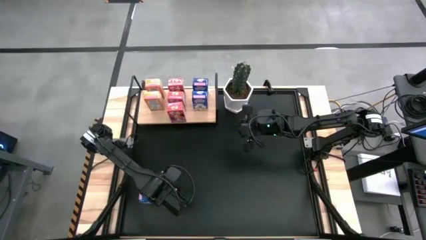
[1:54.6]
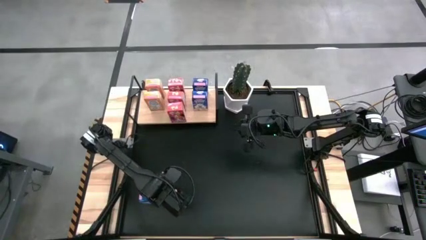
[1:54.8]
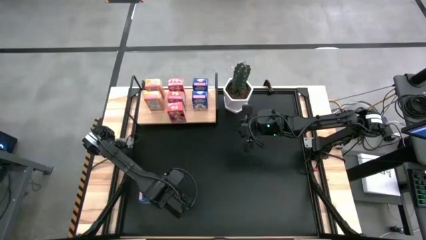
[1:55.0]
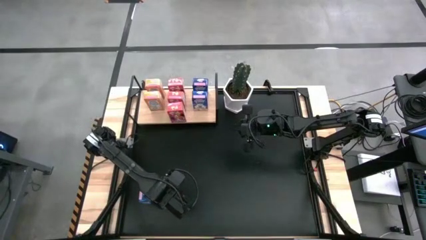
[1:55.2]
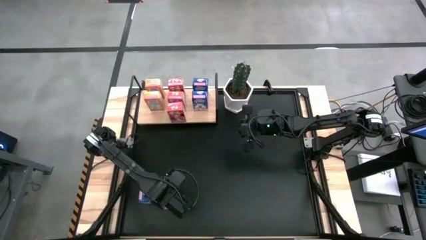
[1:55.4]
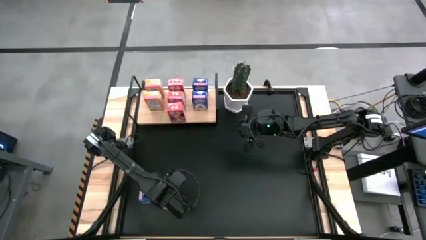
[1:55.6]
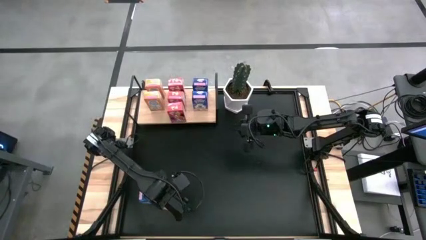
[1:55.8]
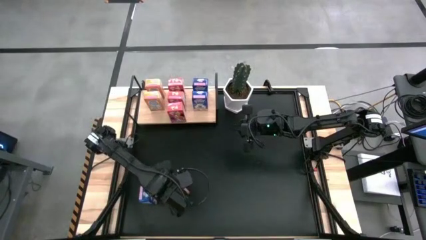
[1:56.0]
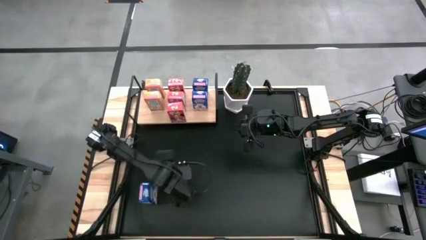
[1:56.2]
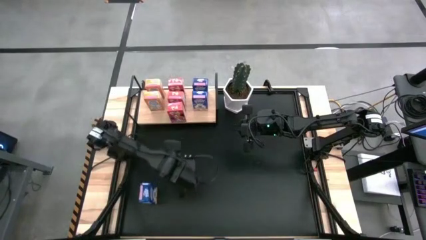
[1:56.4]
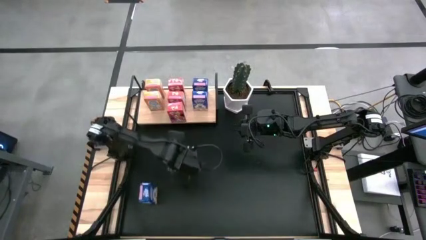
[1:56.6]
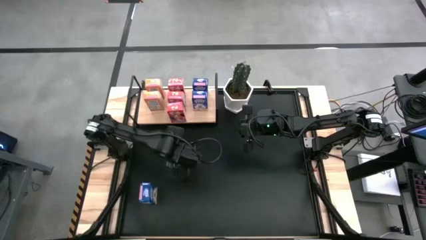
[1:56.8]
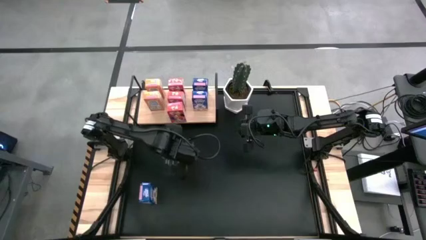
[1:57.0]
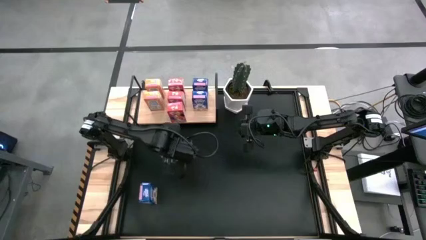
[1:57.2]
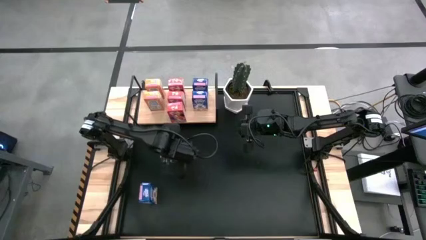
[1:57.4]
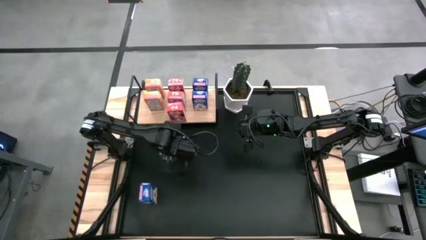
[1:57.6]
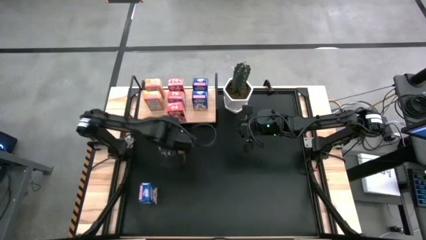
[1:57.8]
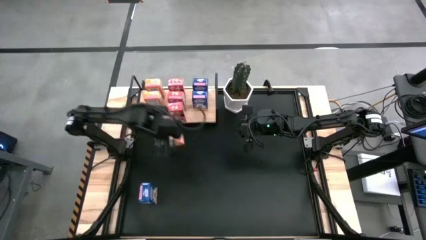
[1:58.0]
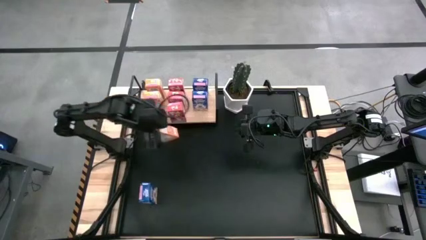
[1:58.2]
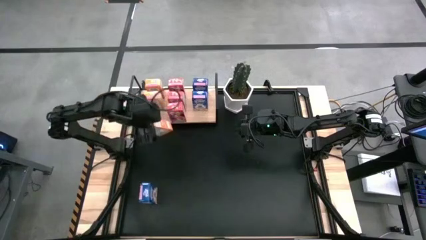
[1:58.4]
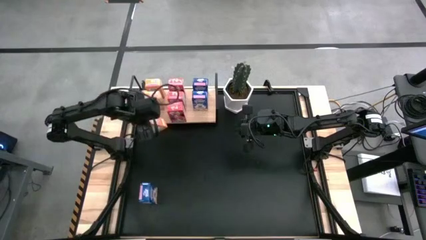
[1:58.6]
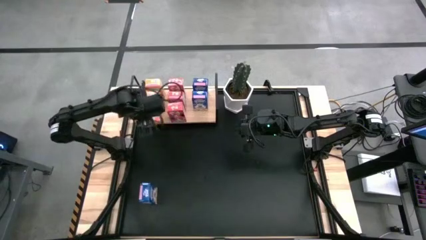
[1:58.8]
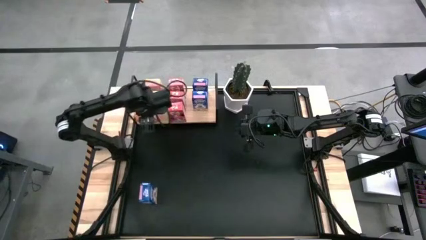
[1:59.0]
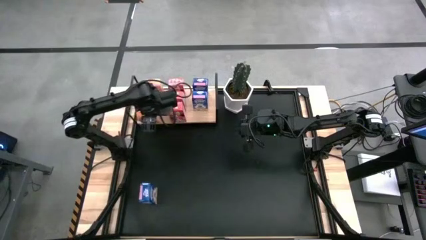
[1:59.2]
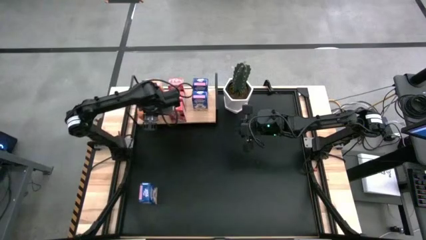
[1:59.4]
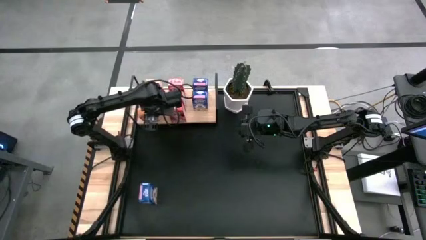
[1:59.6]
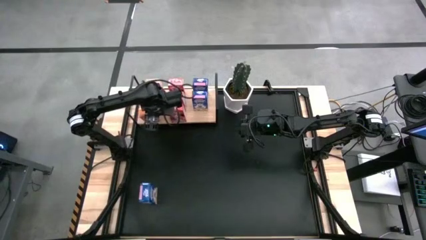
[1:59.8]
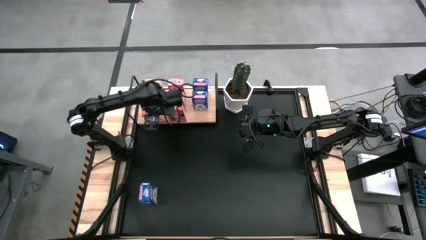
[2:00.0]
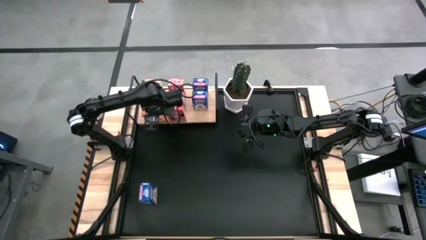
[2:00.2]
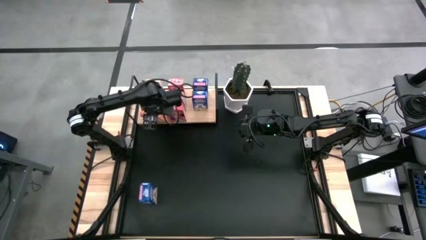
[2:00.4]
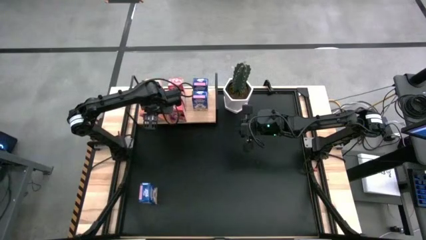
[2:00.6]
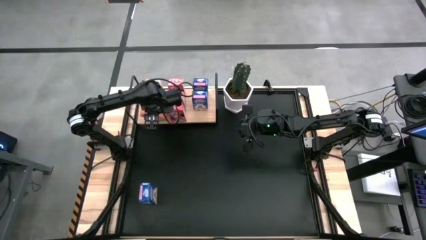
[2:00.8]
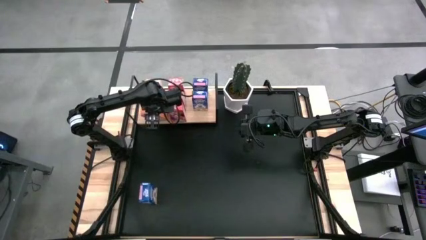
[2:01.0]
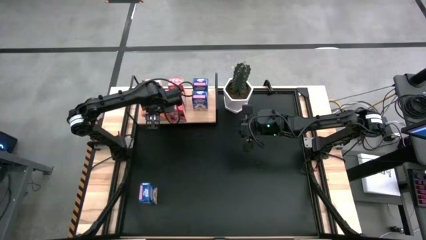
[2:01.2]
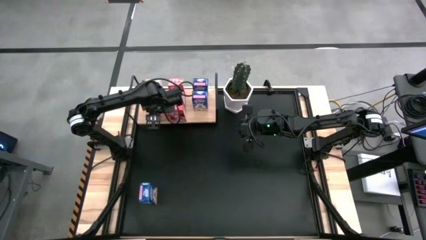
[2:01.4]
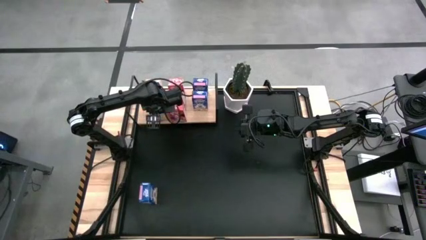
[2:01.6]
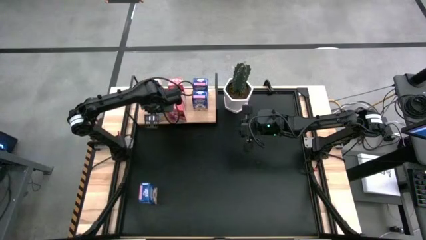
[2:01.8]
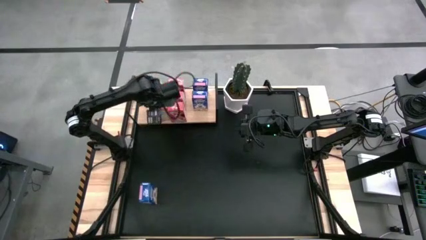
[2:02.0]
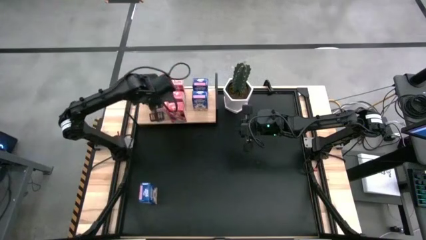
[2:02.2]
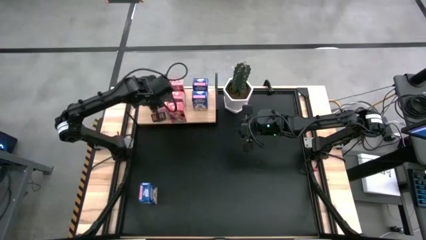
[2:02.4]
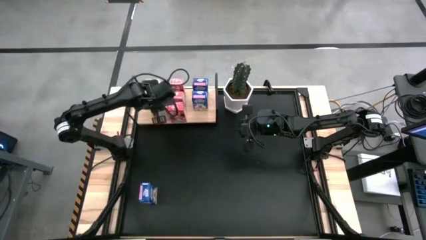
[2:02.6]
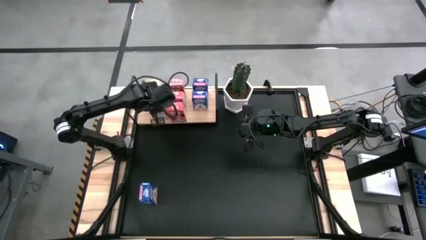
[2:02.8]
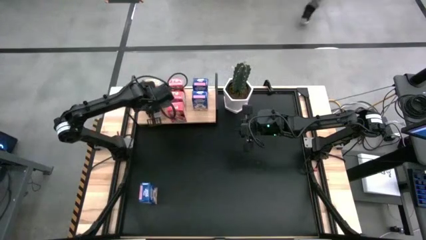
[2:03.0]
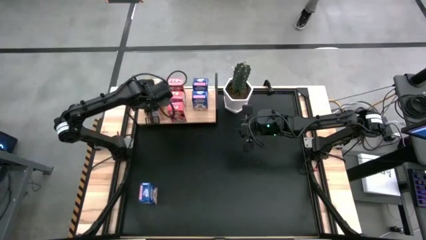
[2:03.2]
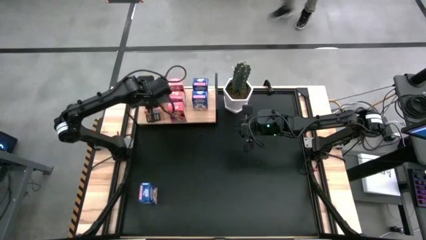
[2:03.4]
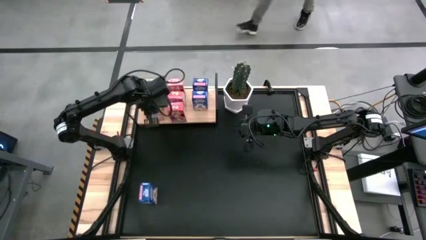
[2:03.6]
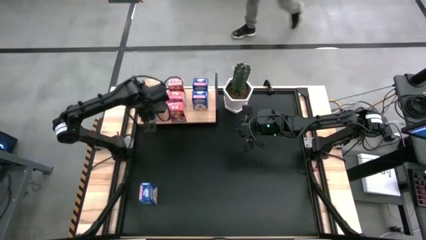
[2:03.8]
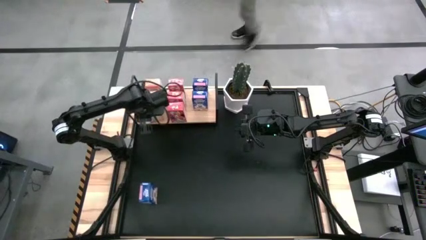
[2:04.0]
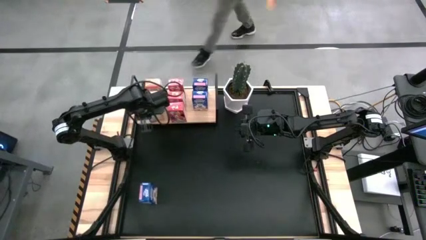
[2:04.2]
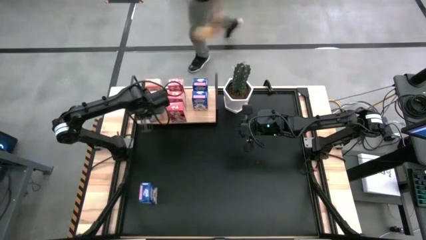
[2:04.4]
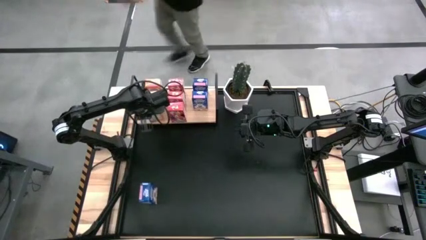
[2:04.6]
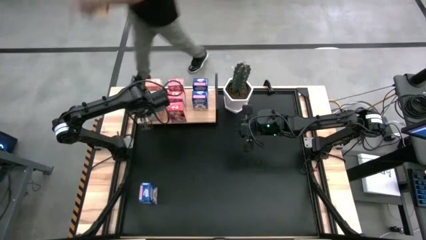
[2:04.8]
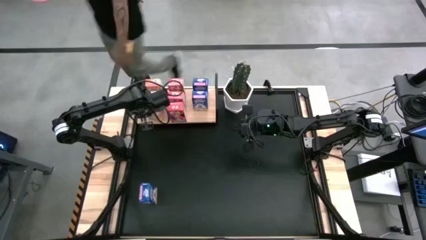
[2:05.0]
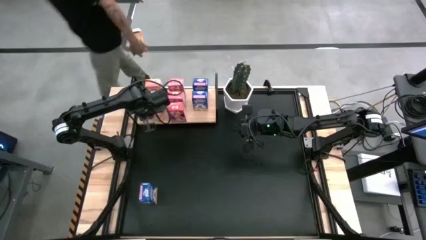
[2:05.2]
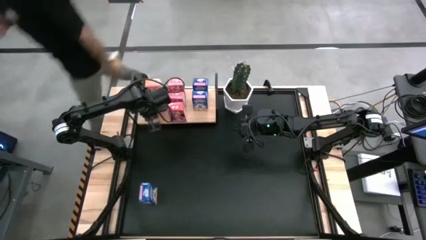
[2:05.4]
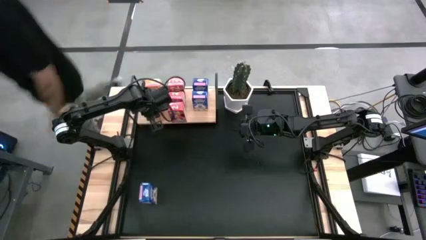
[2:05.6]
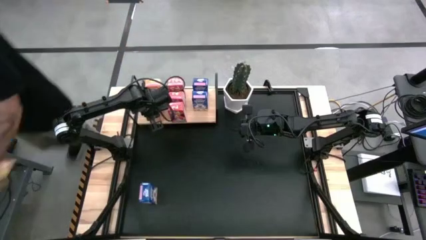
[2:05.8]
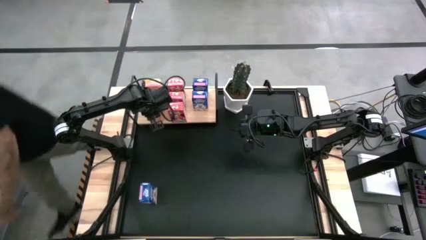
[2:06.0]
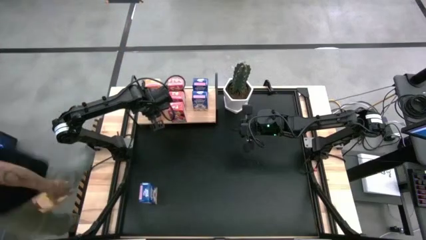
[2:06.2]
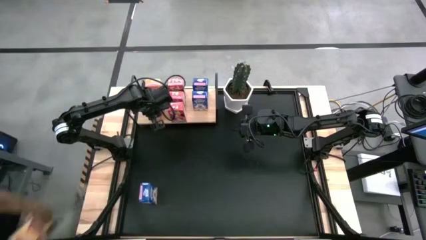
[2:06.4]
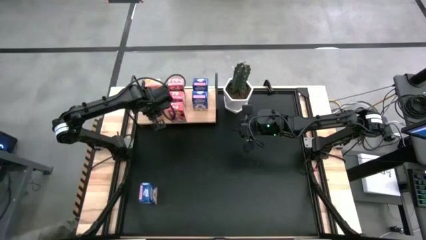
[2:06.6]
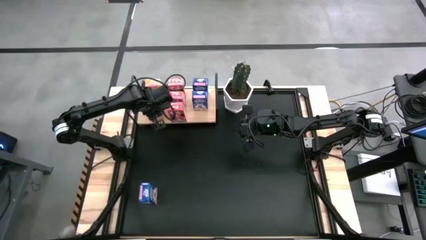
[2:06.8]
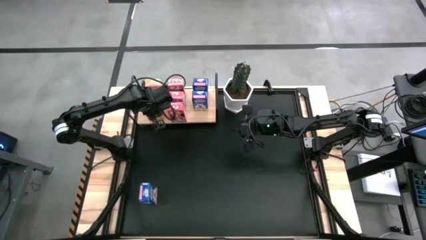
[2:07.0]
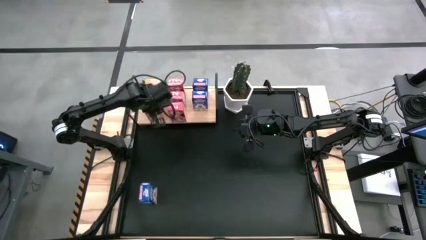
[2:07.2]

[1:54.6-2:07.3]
Task: Stack cereal on shelf
Put the orange cereal box on the shelf and align it with the other orange cereal boxes

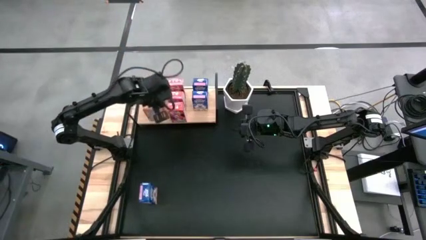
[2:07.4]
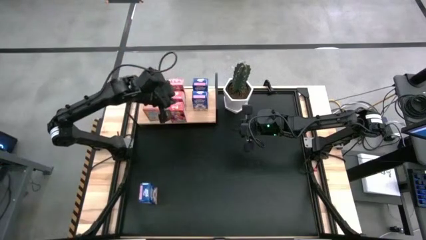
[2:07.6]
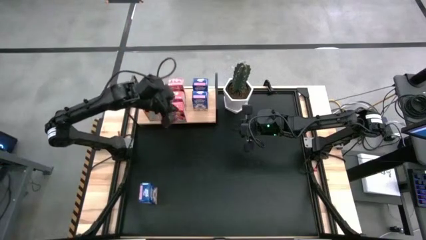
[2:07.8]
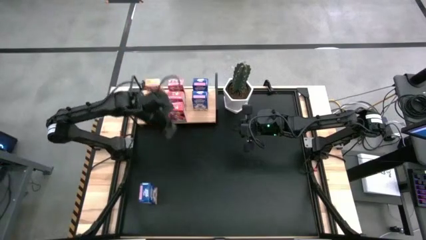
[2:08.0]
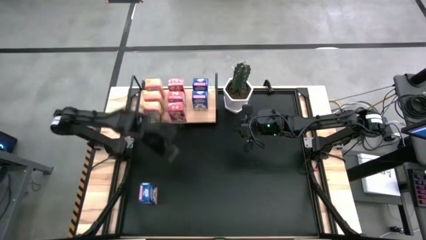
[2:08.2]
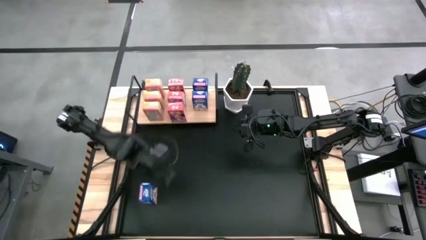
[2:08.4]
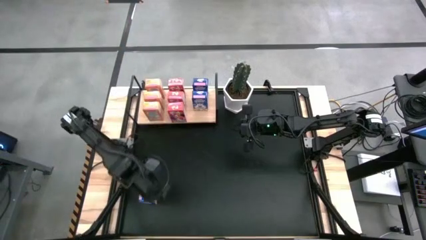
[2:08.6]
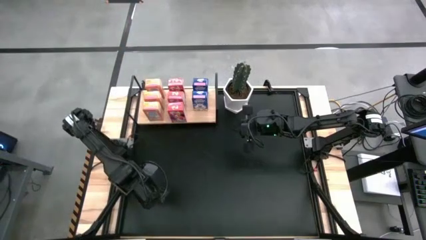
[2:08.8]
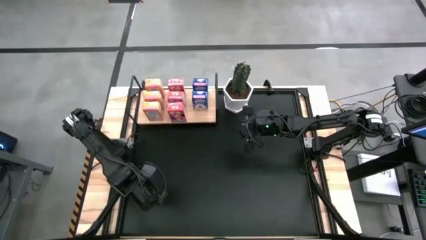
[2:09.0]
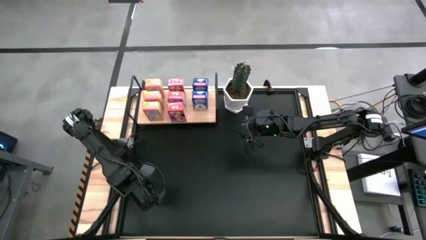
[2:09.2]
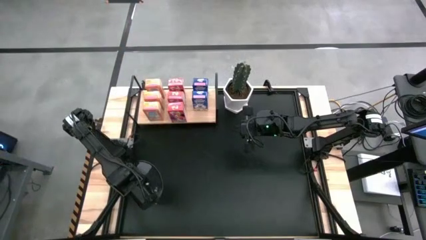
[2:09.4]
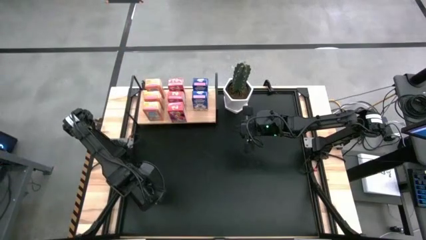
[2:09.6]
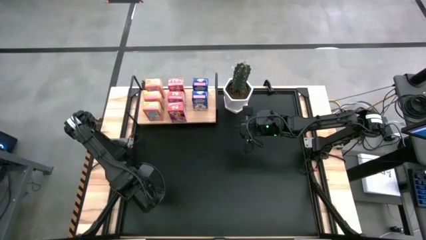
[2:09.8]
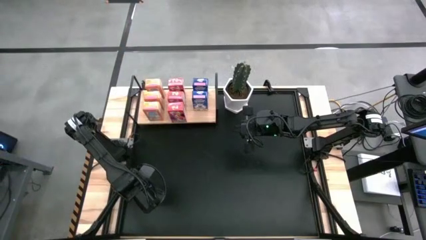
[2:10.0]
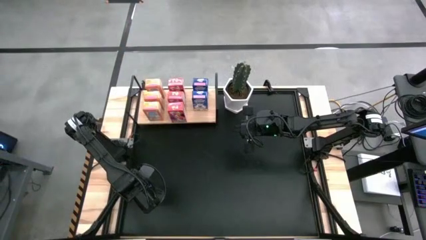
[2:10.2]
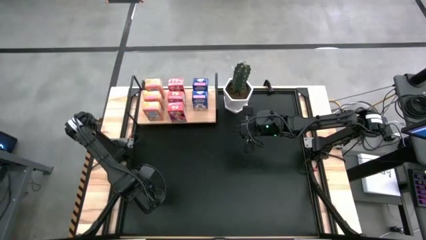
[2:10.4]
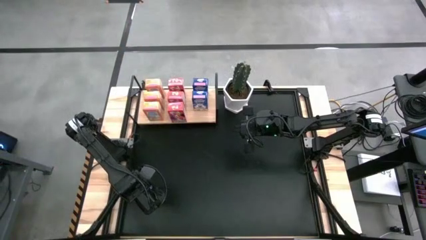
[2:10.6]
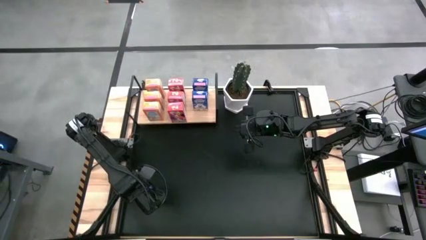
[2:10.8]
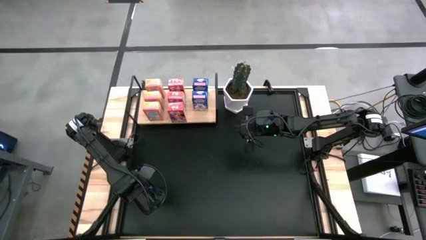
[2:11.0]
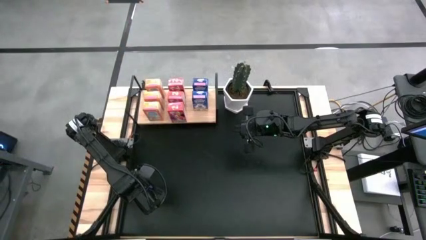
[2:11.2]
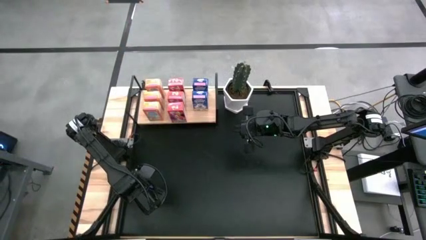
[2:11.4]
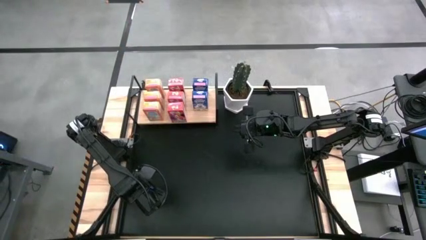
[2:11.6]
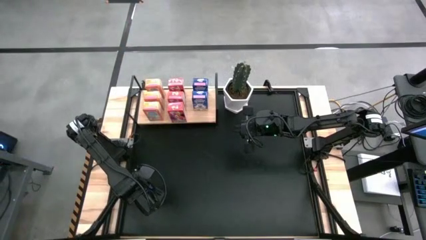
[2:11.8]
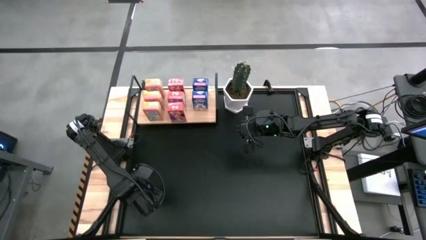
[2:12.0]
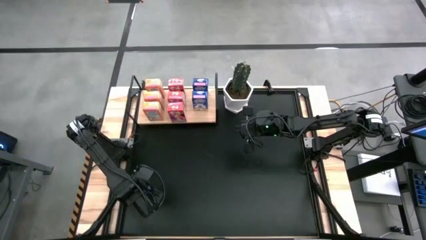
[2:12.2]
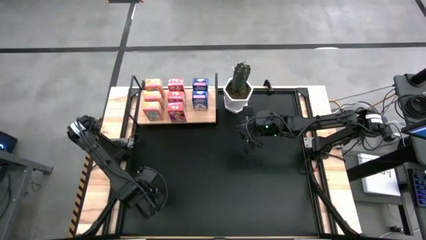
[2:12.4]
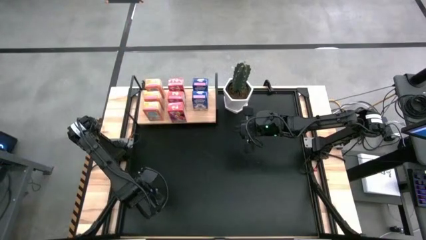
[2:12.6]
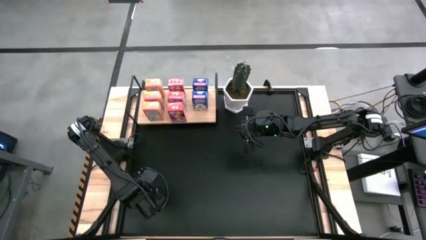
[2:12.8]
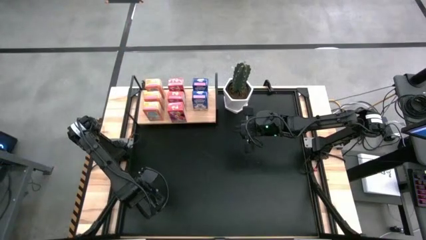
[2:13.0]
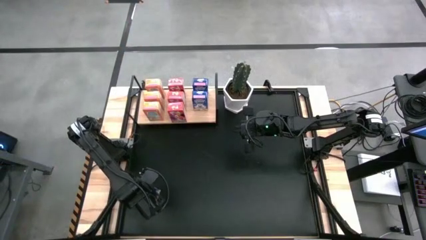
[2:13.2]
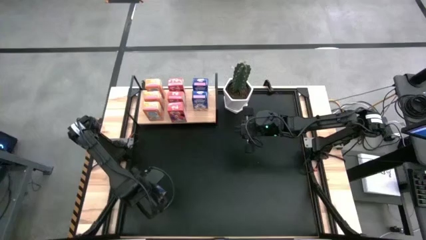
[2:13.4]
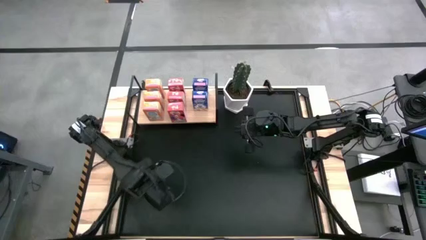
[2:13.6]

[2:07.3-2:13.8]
Put the blue cereal box on the shelf and align it with the other blue cereal boxes
